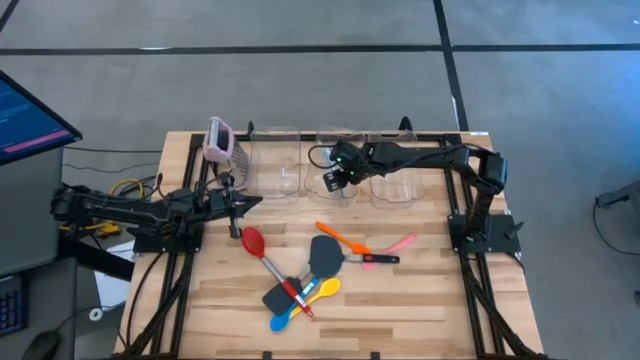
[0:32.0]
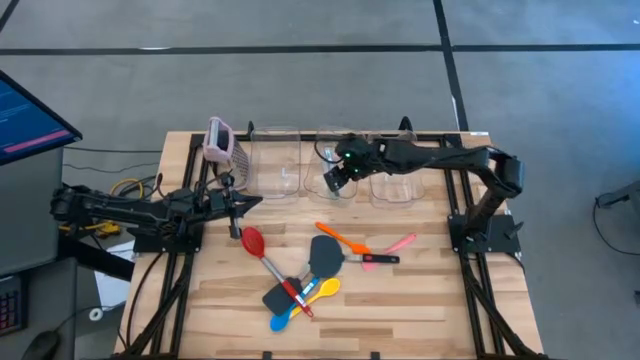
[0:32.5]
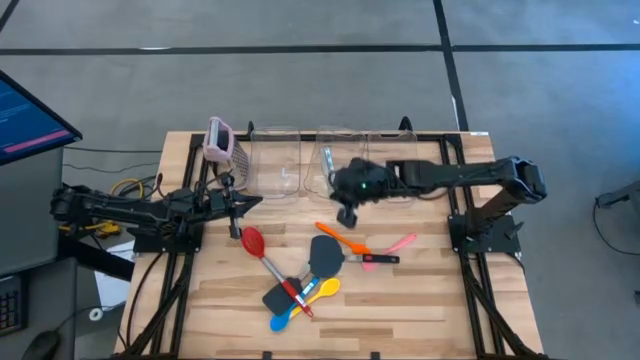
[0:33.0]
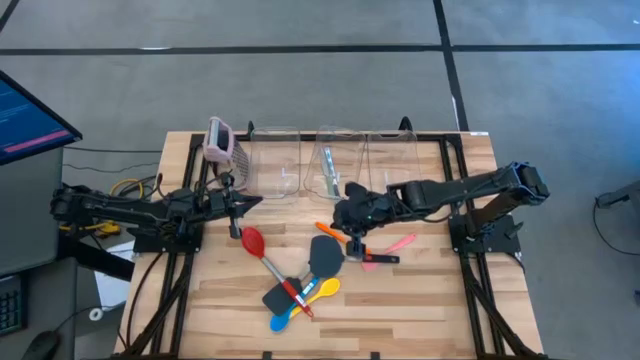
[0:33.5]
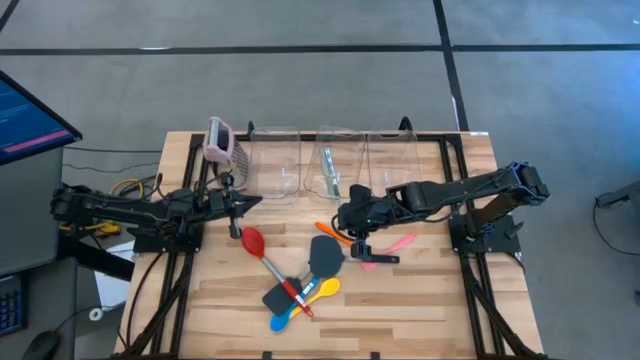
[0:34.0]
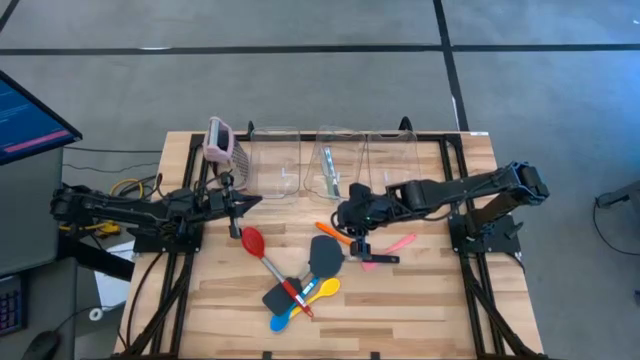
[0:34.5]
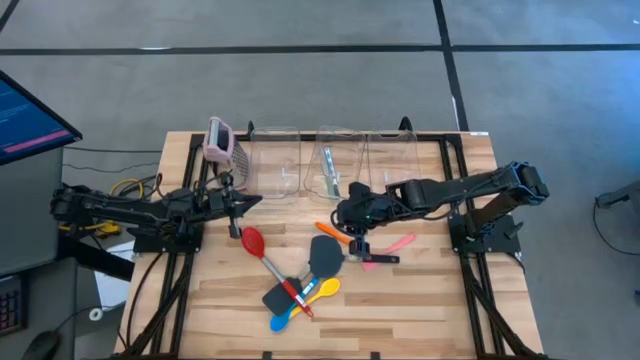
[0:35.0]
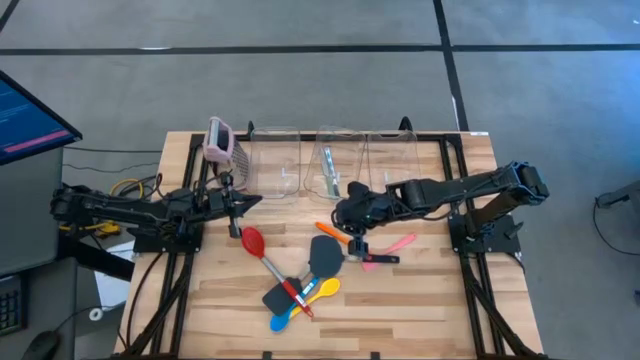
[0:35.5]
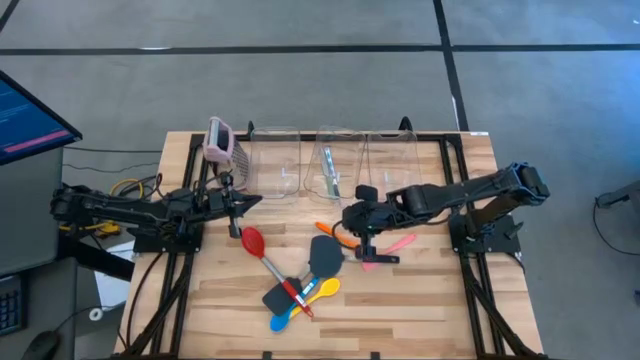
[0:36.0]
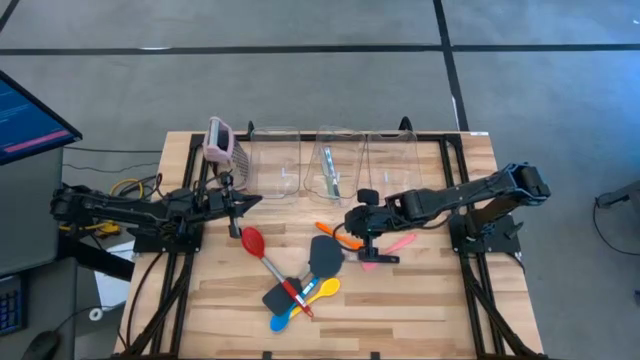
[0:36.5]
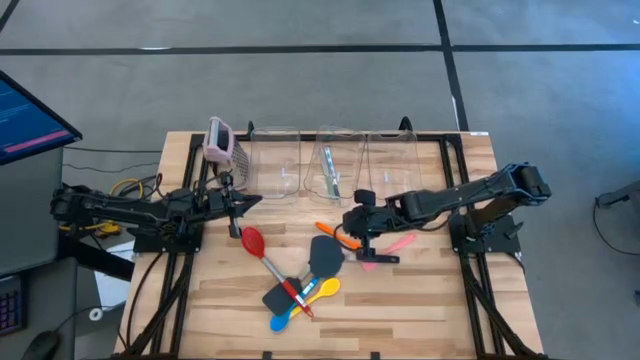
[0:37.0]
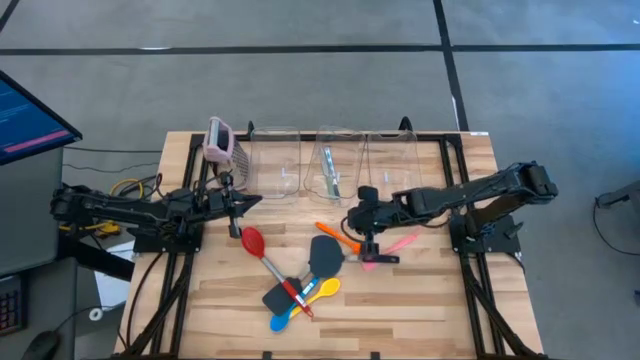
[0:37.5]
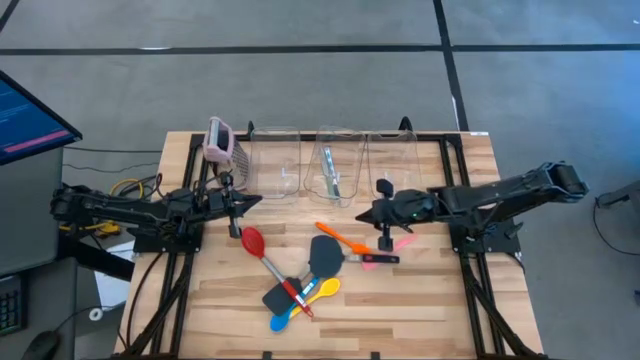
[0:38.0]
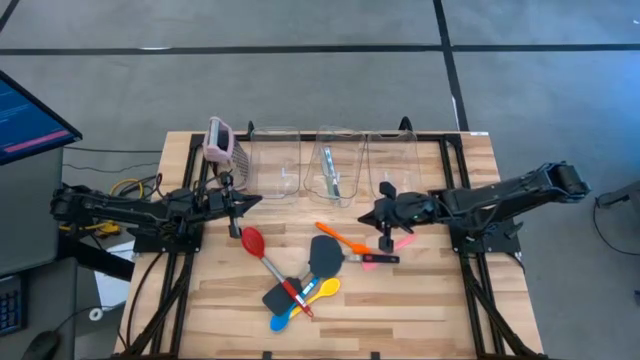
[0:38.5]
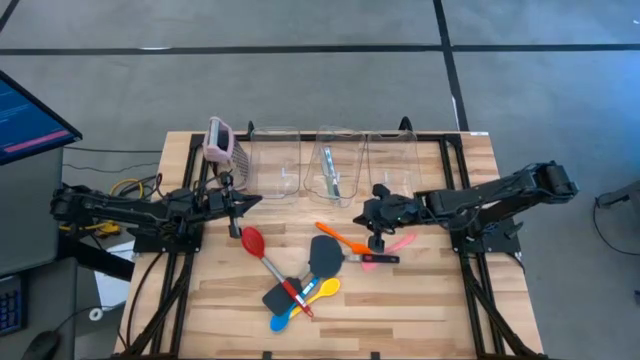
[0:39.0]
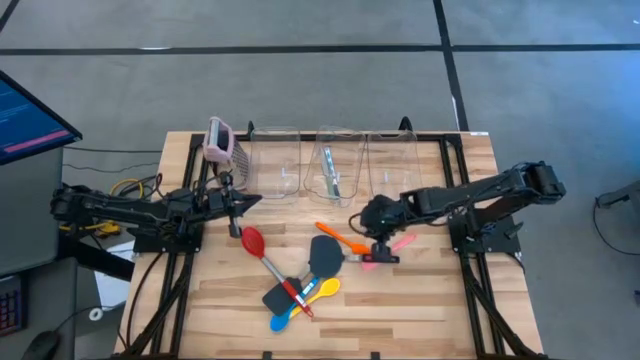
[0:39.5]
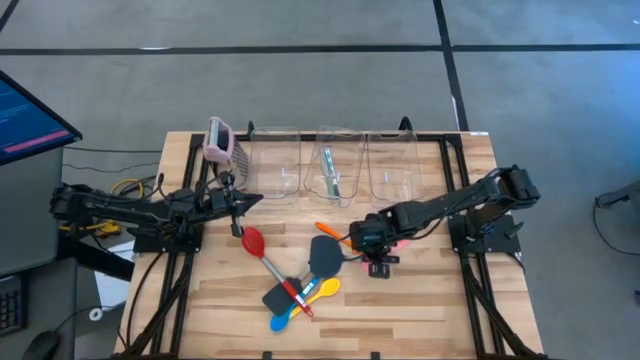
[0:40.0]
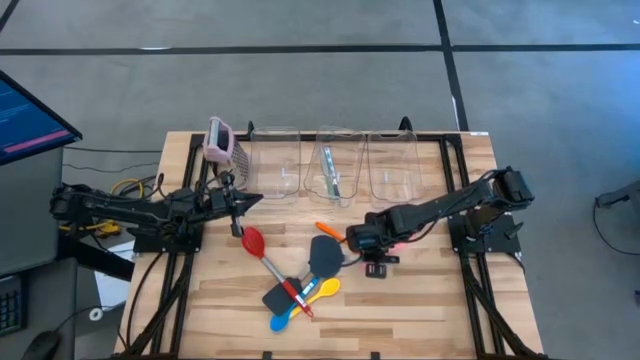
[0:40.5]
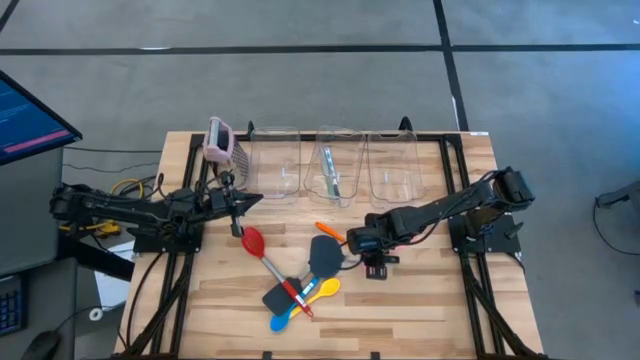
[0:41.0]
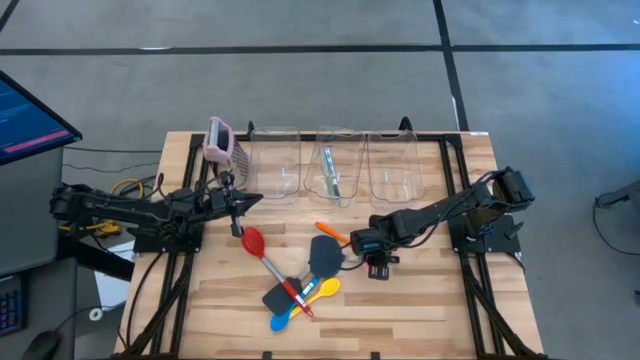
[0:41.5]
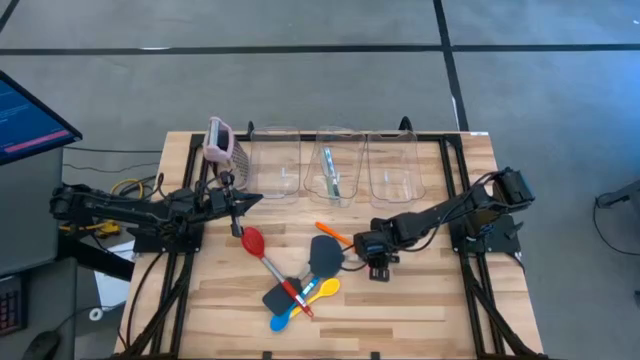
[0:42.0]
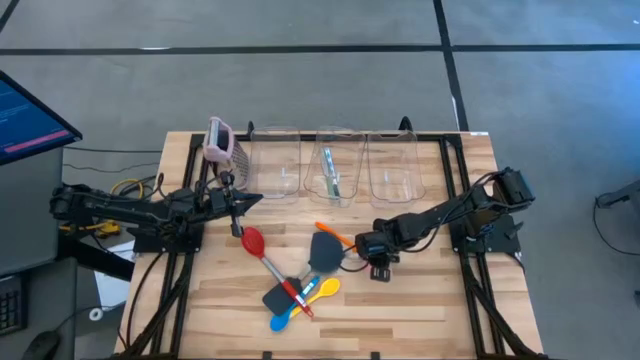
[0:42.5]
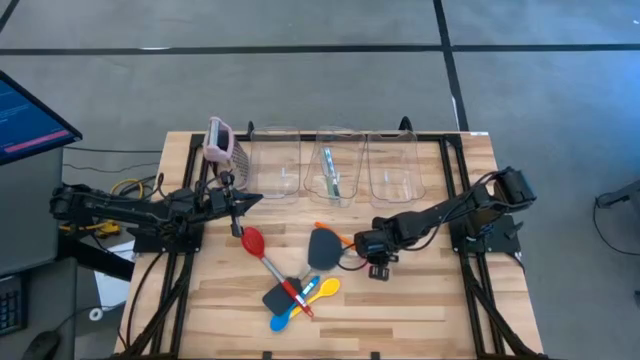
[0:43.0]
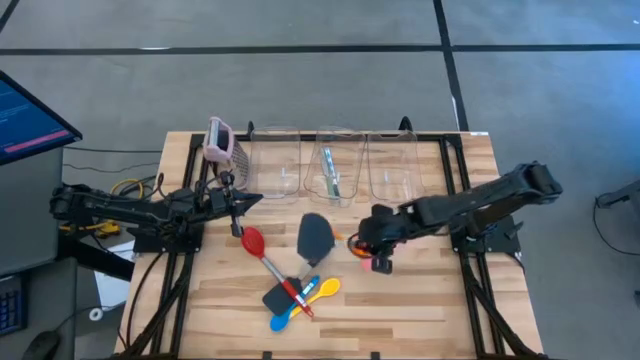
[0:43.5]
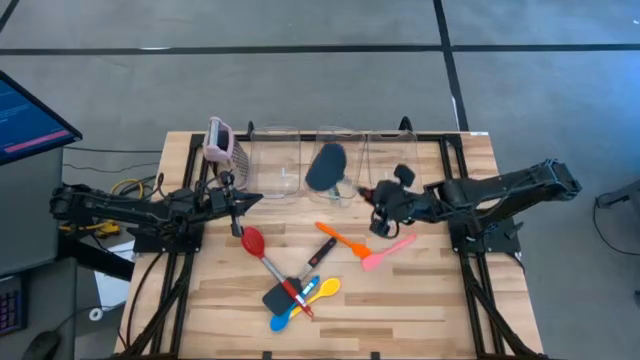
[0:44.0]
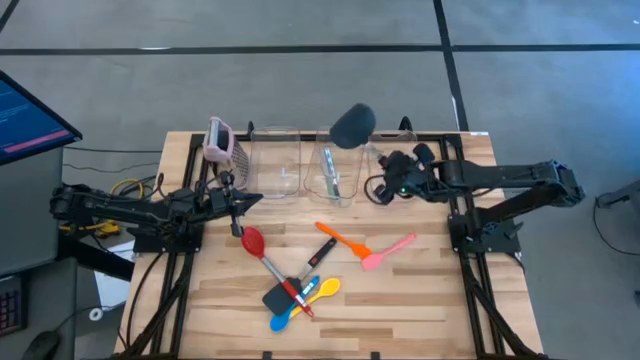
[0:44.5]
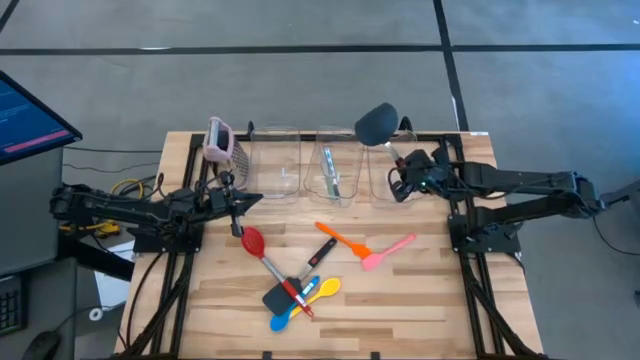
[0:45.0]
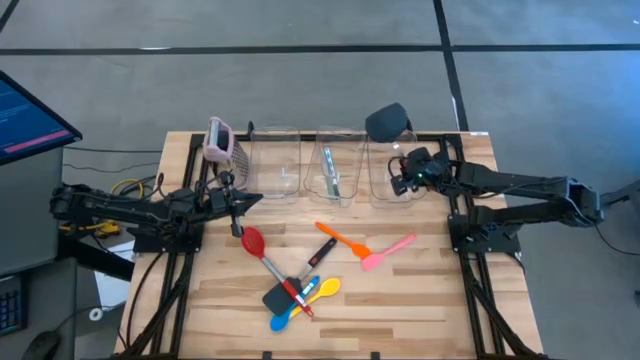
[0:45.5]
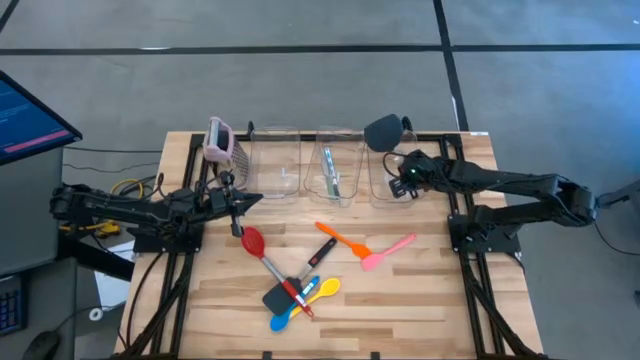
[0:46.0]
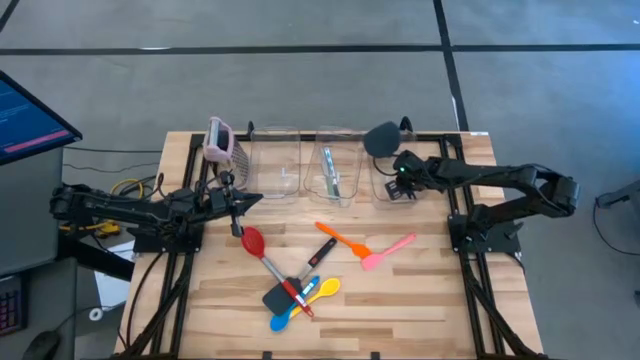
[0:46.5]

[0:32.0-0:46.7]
Task: Pick & Place Kitchen Items
Put the blue spatula into the right transparent bin

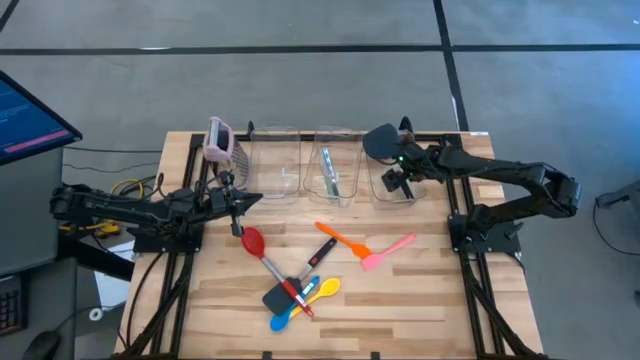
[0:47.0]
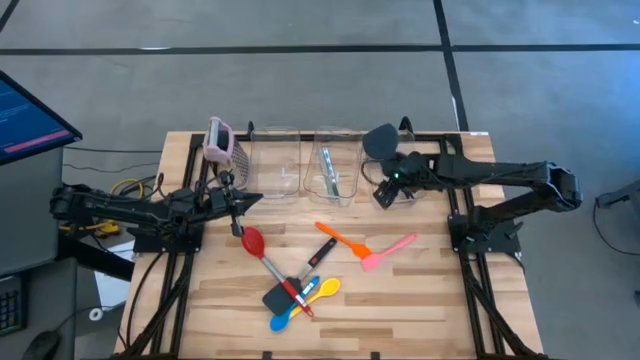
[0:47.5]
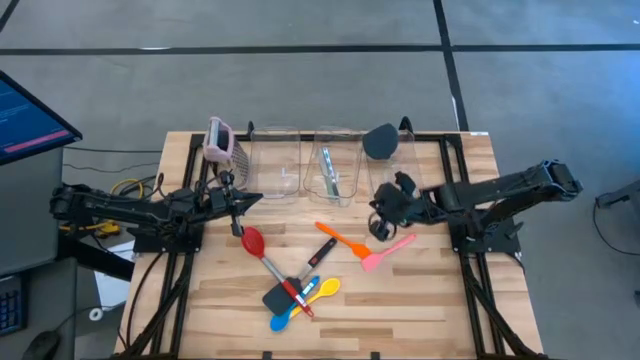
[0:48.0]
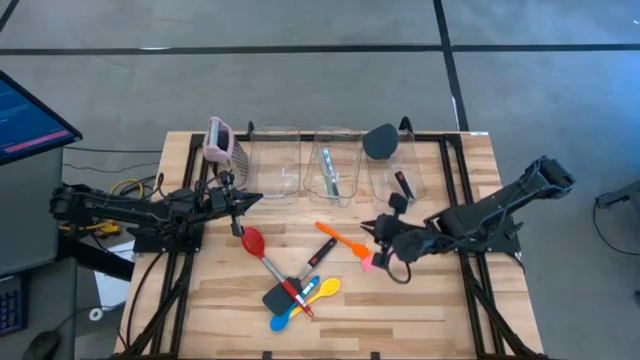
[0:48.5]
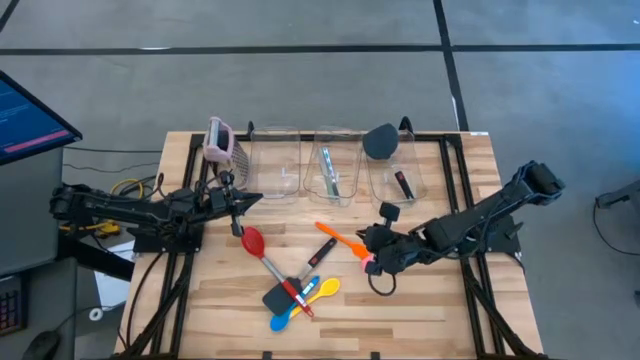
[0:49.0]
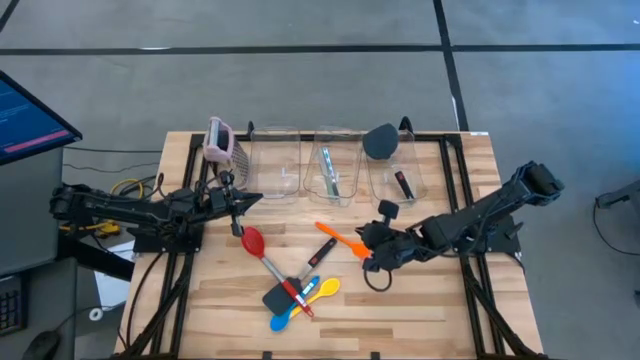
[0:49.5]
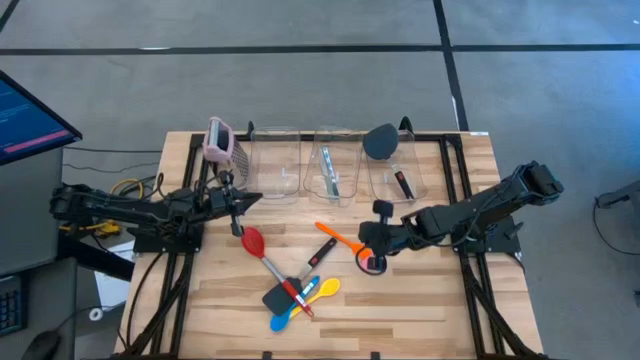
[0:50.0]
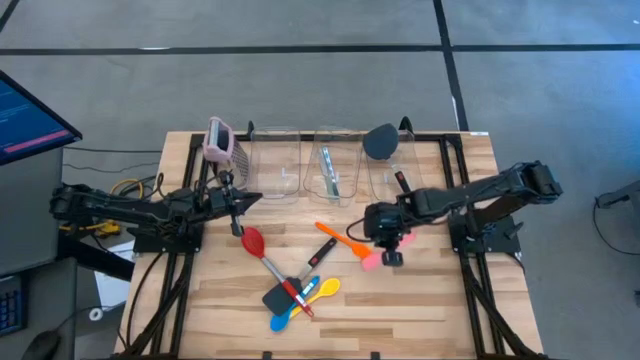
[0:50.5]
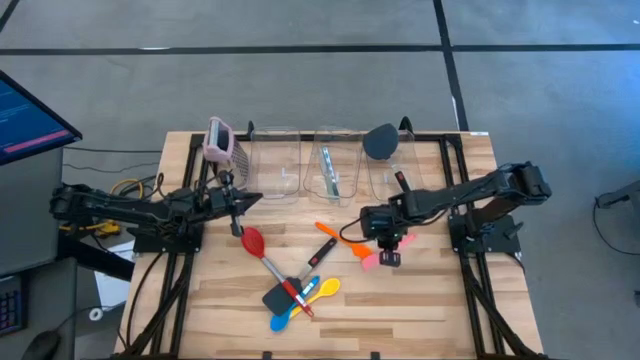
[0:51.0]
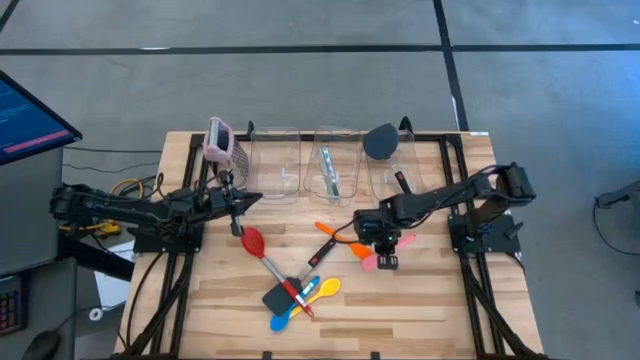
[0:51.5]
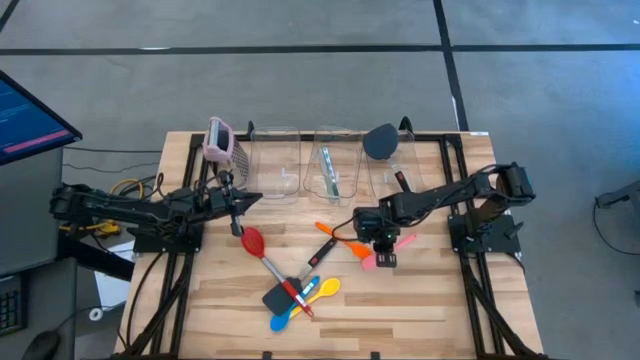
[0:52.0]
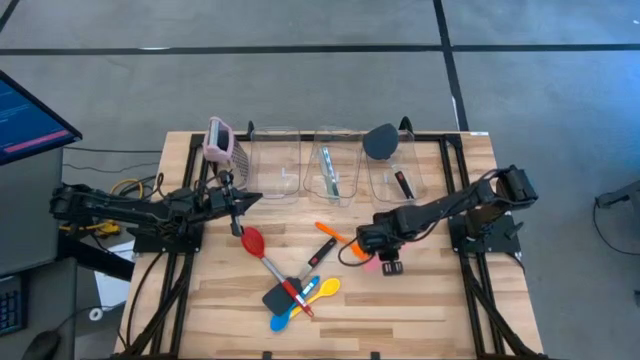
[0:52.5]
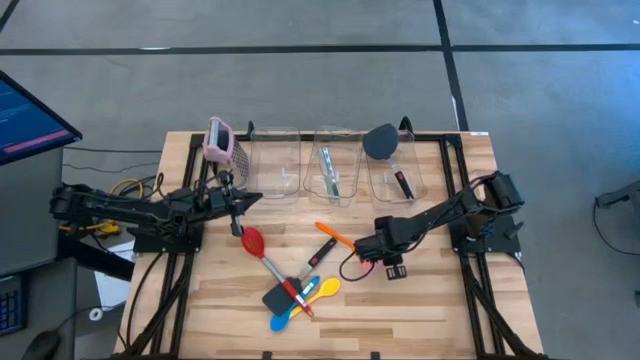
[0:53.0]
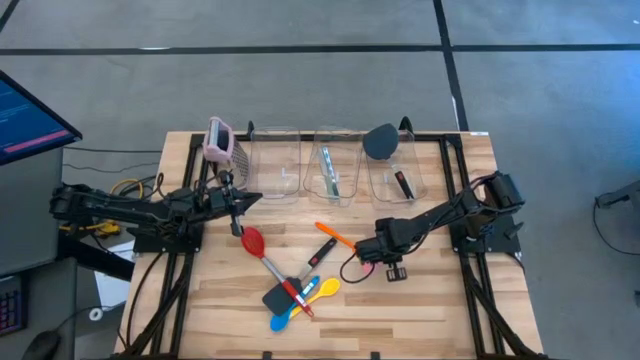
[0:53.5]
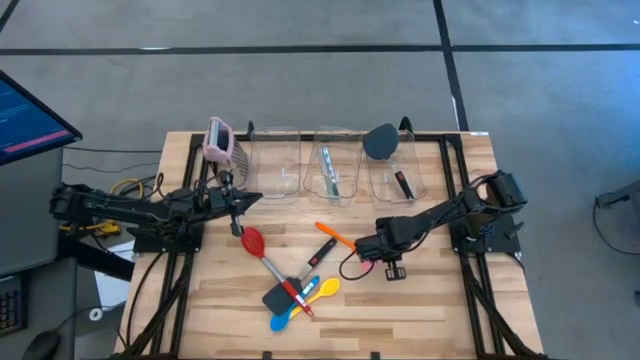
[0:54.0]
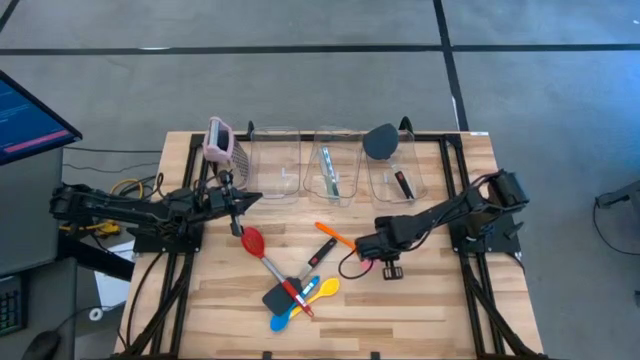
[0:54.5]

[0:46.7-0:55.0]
Put the pink spatula into the right transparent bin
